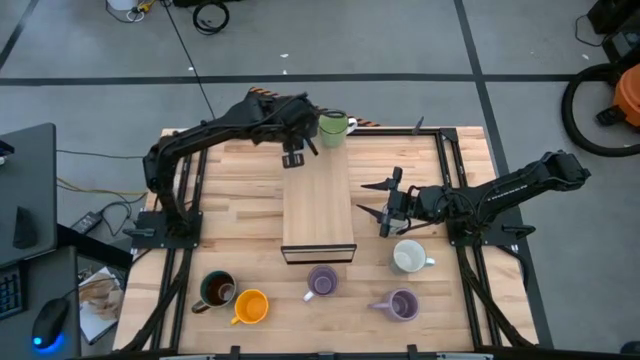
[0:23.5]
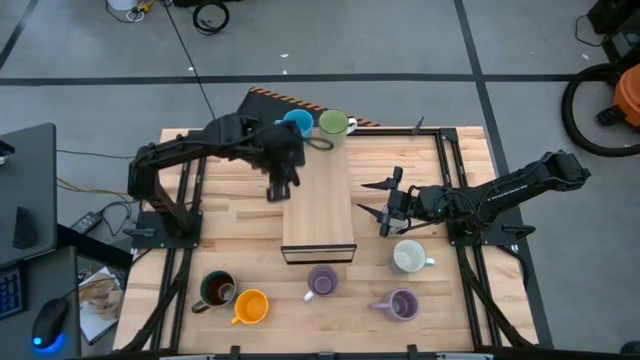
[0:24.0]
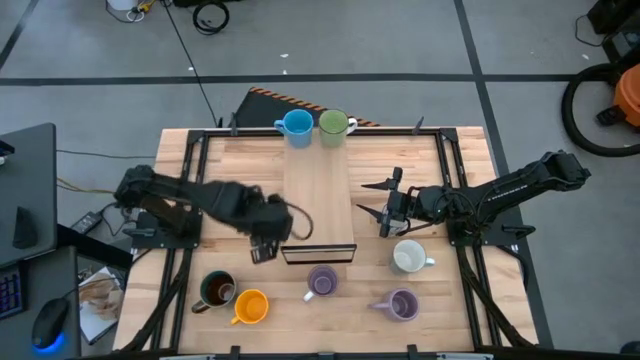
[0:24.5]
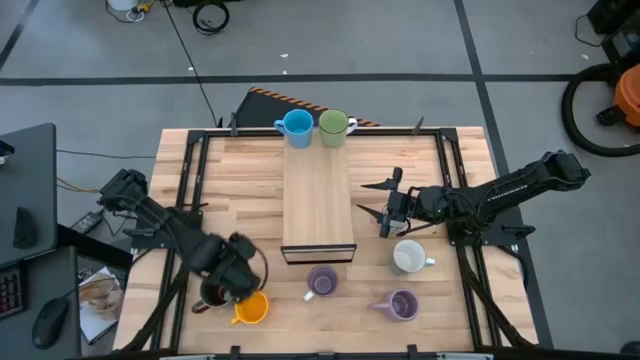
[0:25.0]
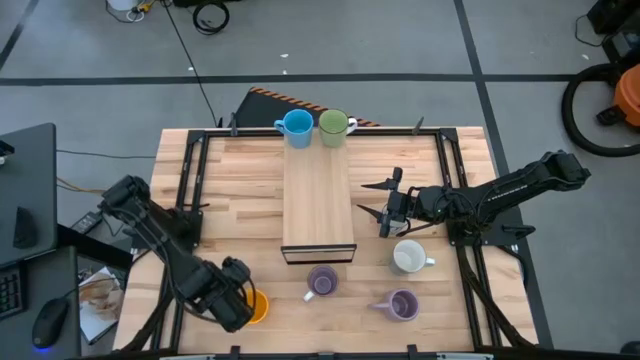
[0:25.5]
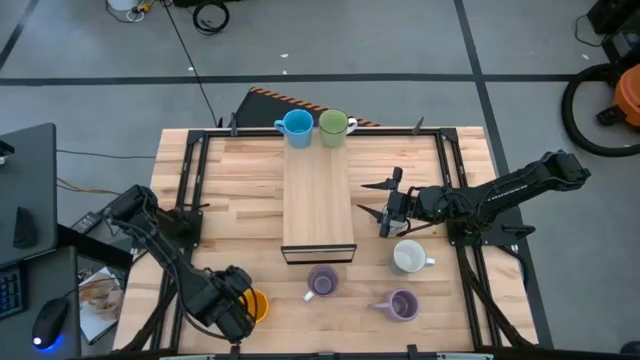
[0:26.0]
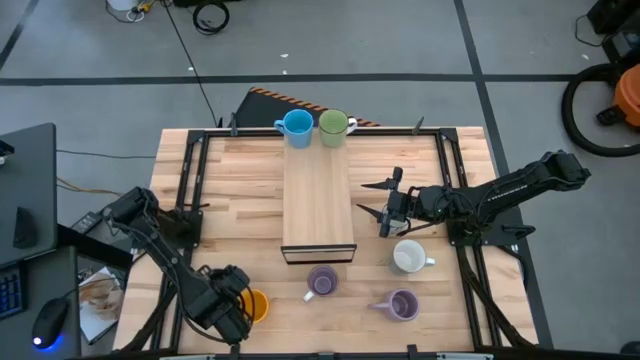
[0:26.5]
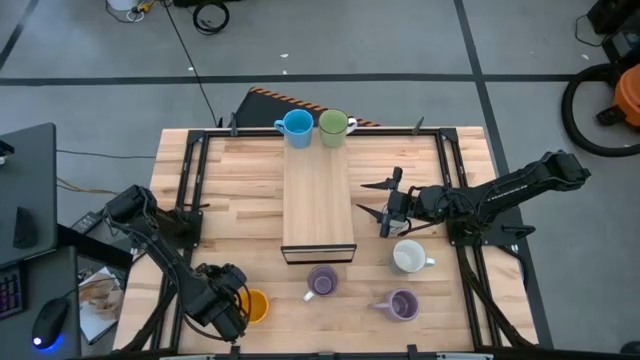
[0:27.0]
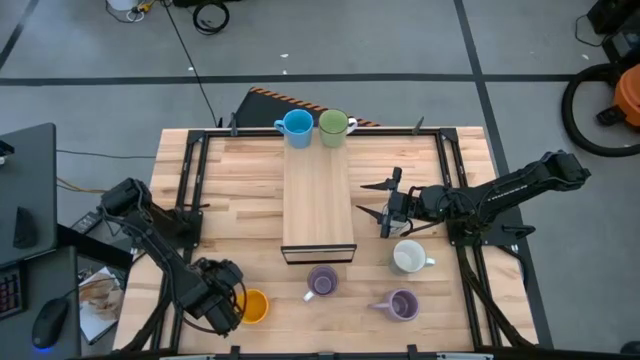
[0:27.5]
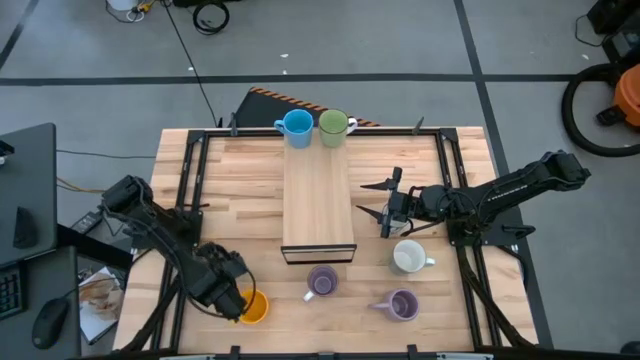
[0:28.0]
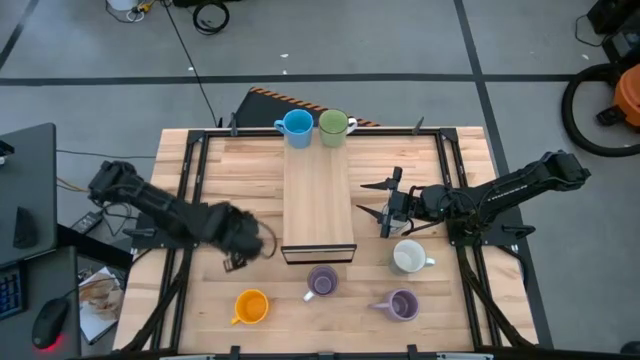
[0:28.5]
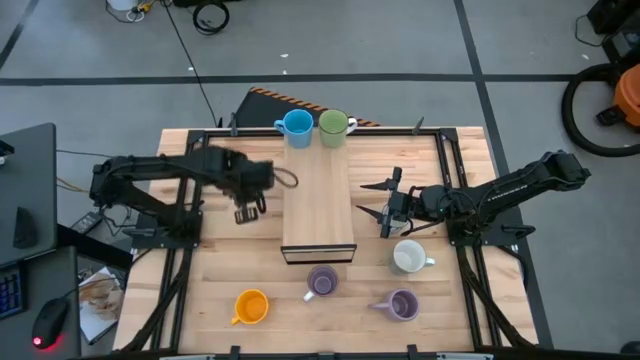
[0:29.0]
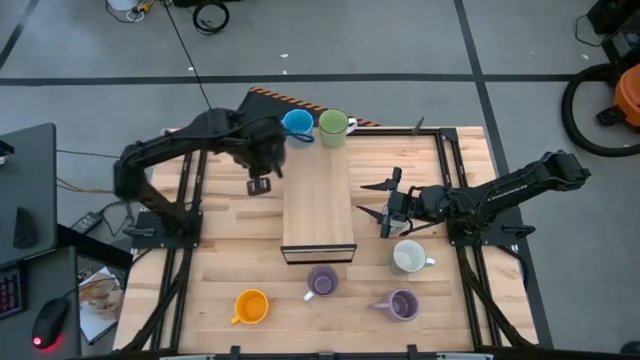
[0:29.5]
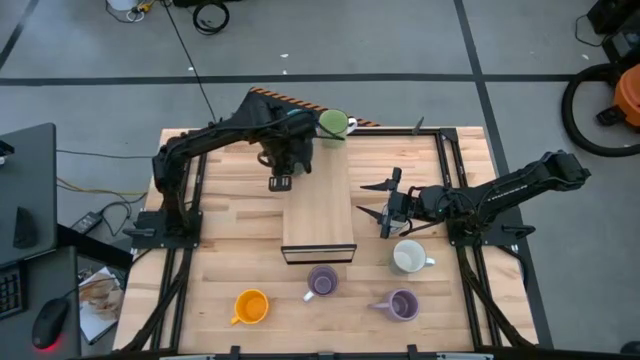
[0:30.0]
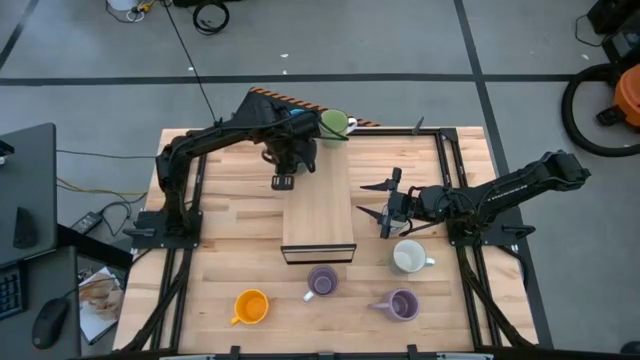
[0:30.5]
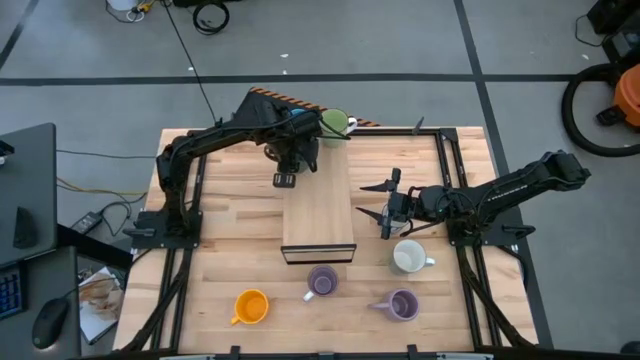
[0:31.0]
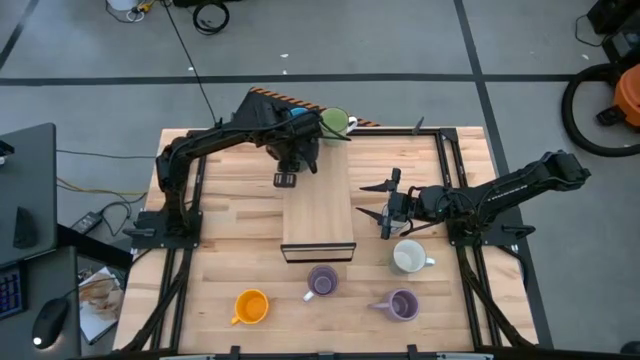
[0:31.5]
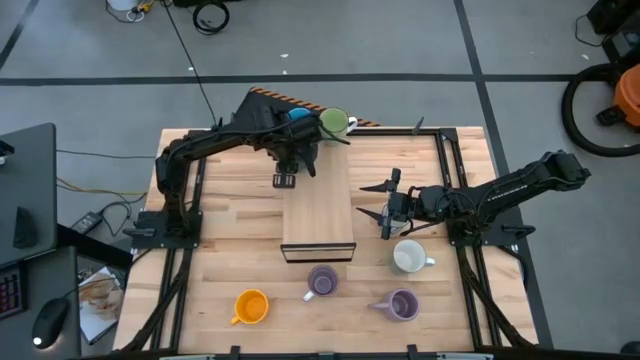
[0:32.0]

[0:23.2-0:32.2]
Task: Place coffee mugs
Put the dark blue mug on the shelf

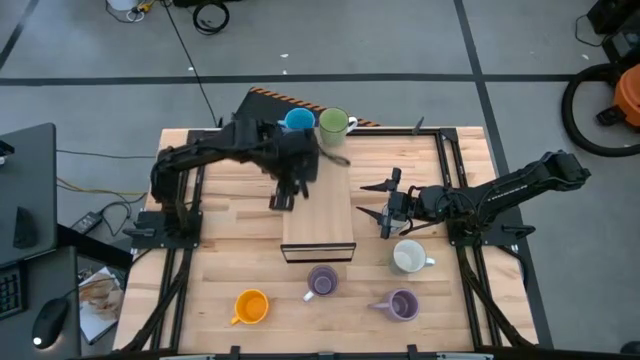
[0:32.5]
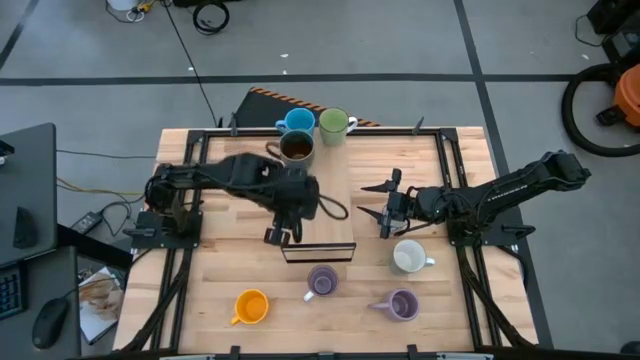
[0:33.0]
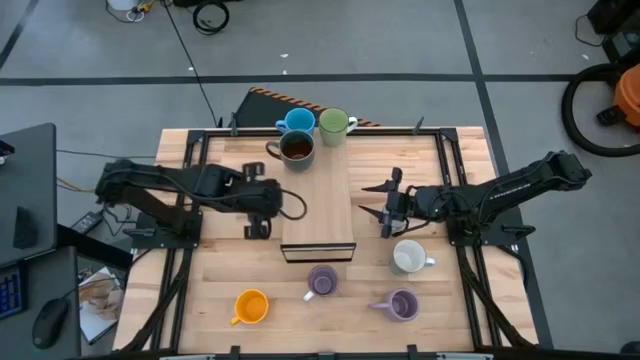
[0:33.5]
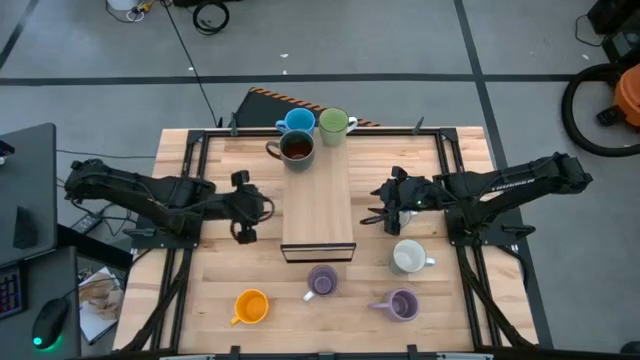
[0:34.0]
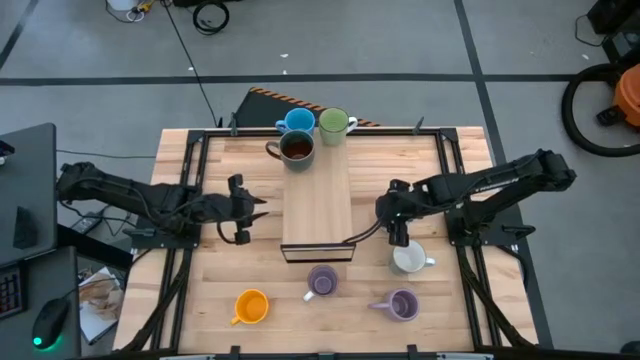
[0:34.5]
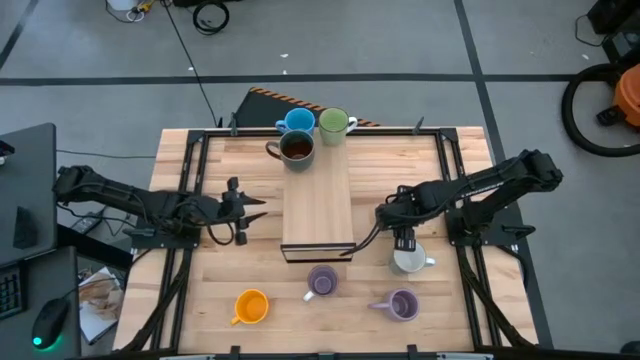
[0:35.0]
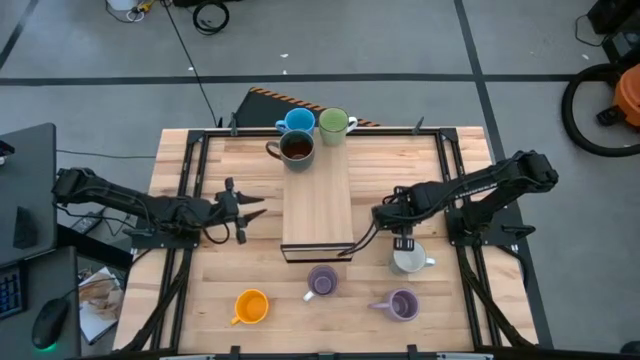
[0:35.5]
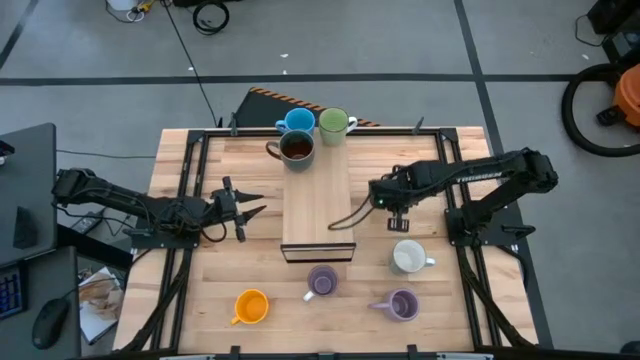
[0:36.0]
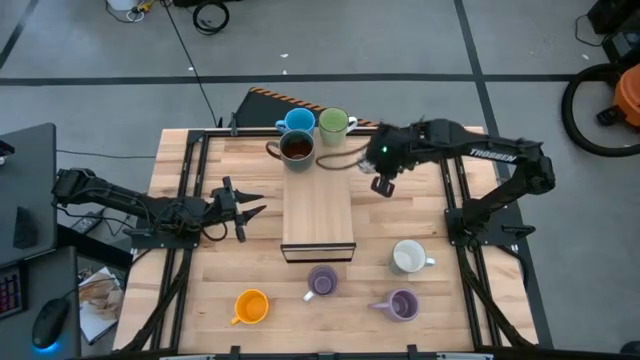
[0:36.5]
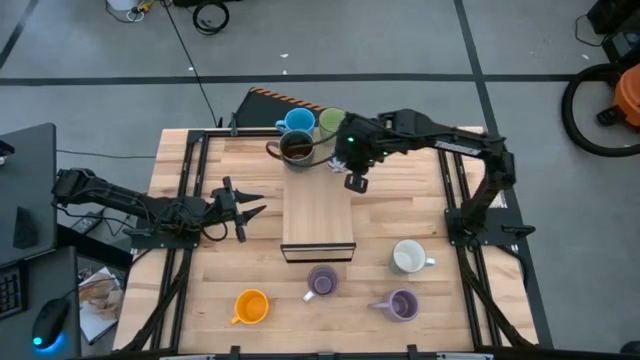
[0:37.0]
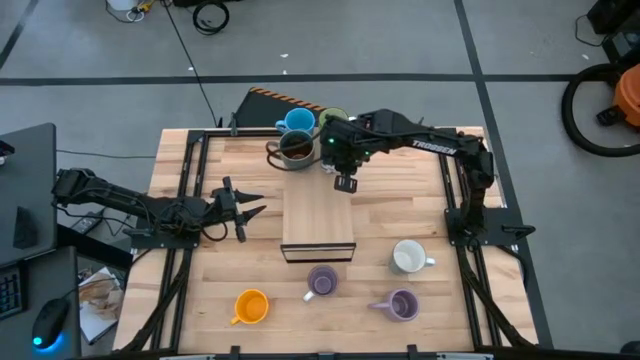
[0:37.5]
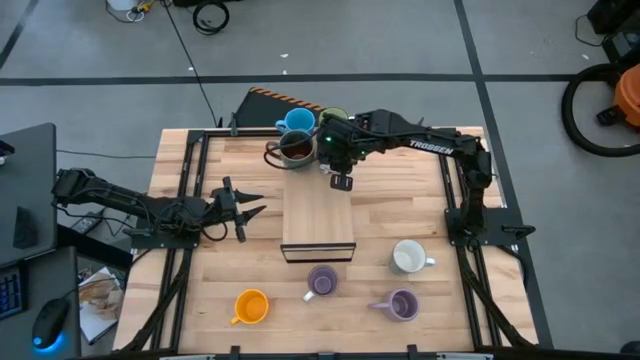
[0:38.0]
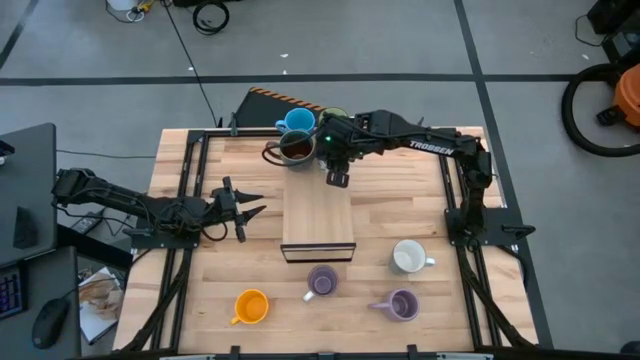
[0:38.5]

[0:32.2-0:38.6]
Put the white blue mug on the shelf

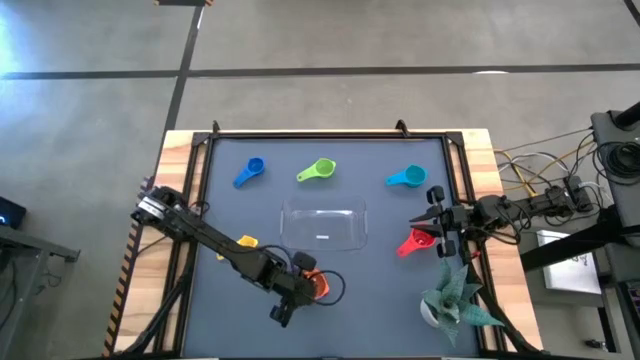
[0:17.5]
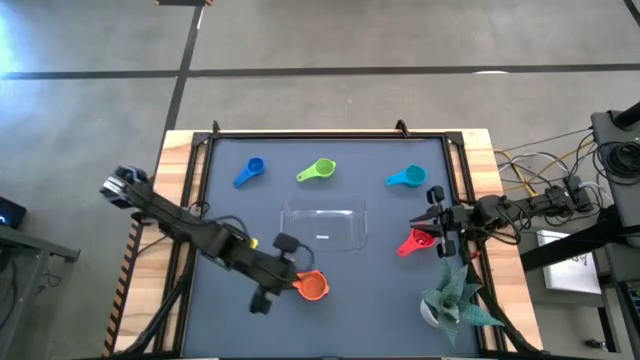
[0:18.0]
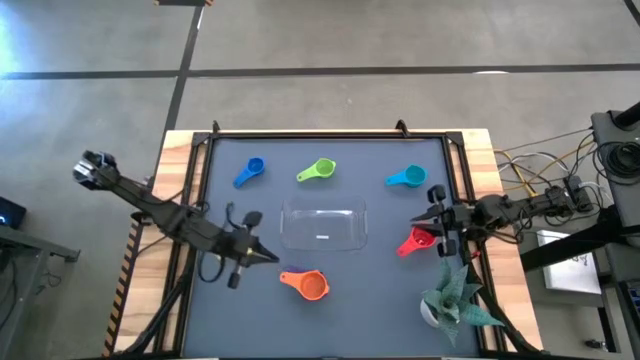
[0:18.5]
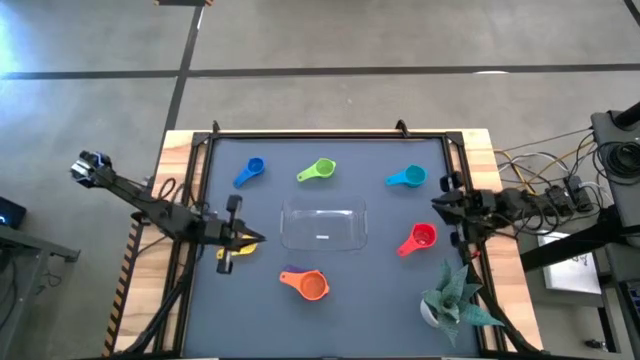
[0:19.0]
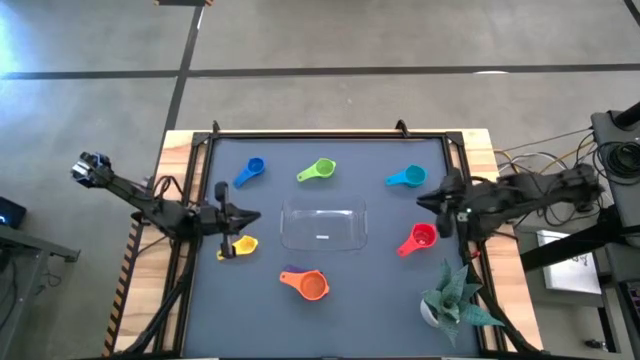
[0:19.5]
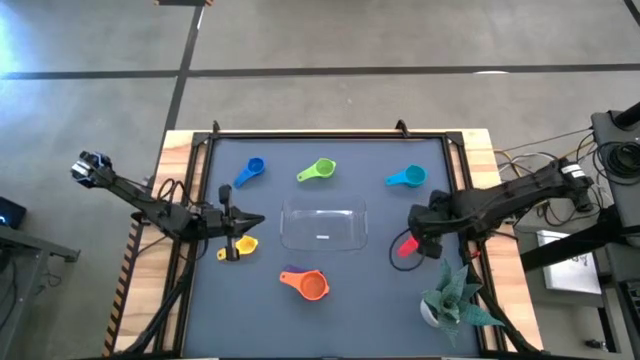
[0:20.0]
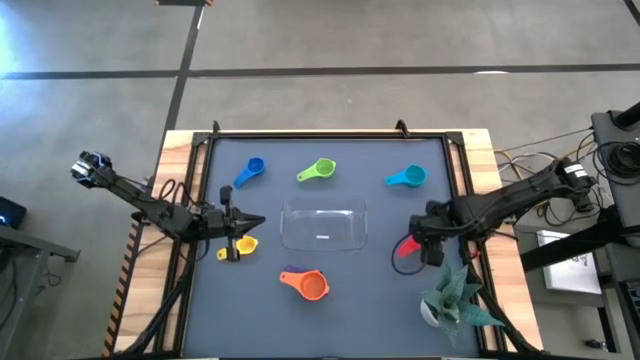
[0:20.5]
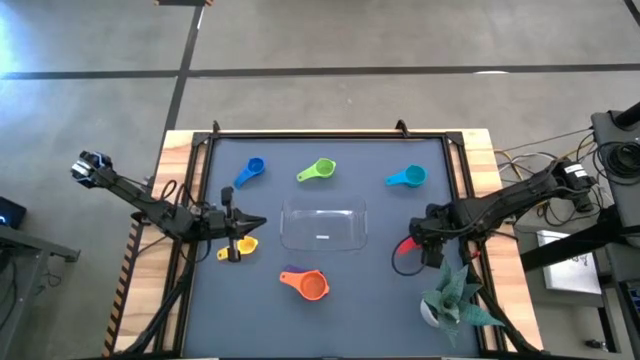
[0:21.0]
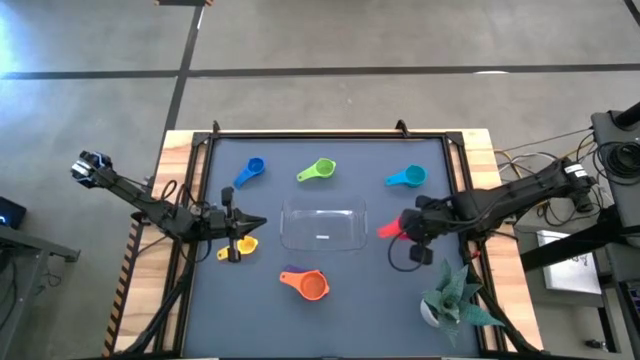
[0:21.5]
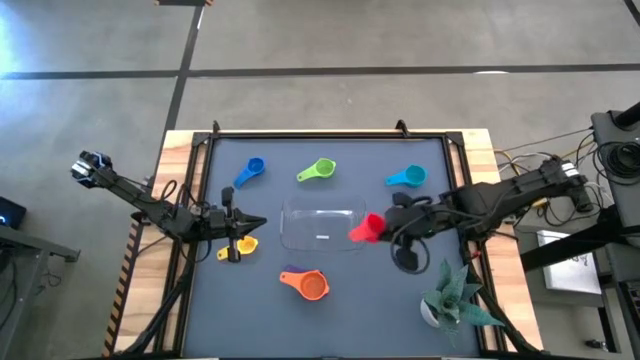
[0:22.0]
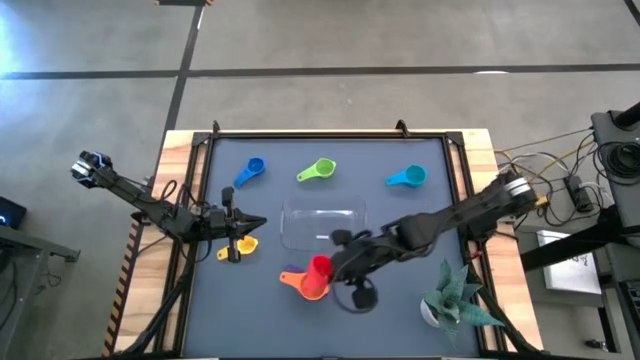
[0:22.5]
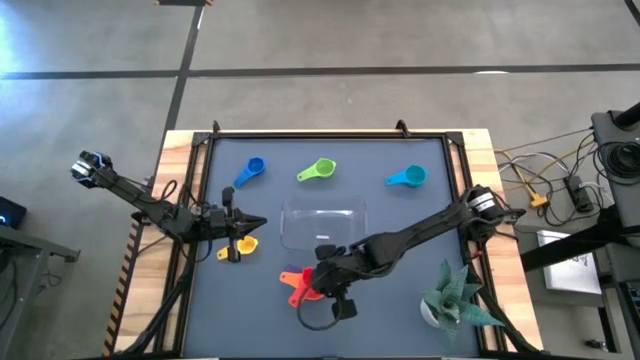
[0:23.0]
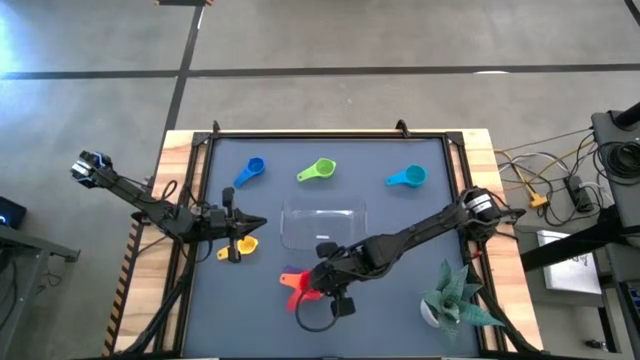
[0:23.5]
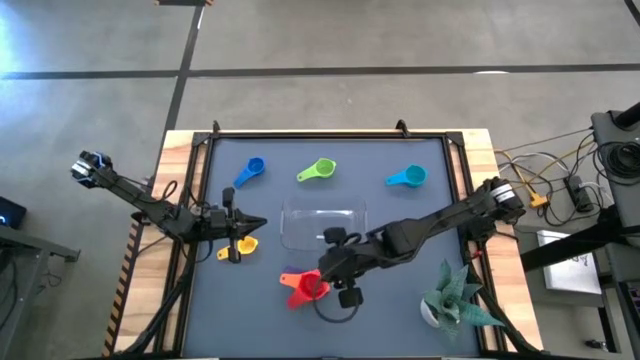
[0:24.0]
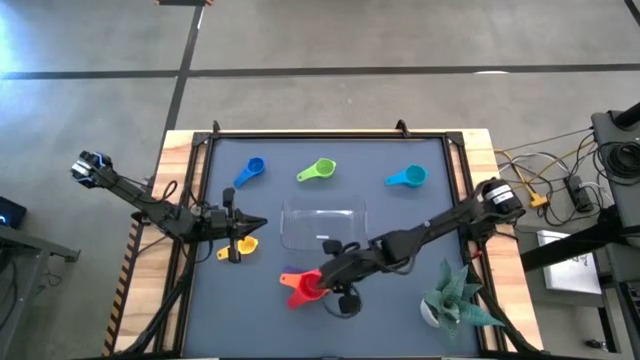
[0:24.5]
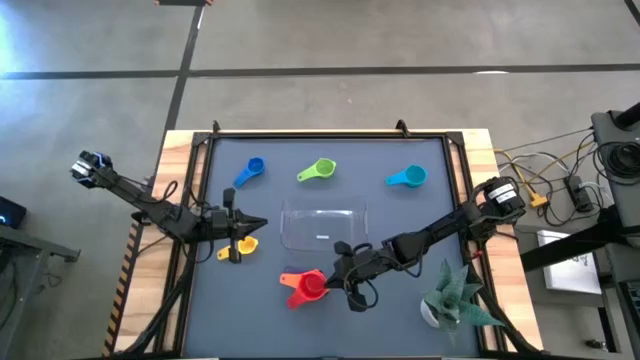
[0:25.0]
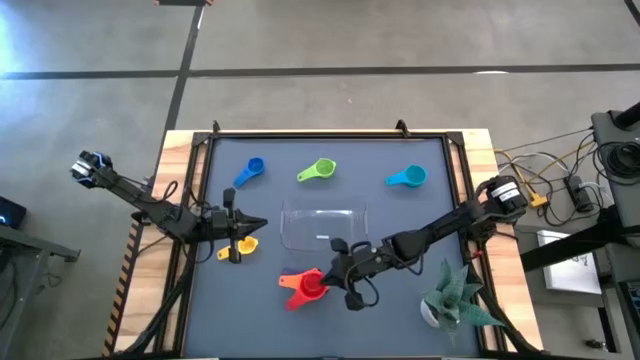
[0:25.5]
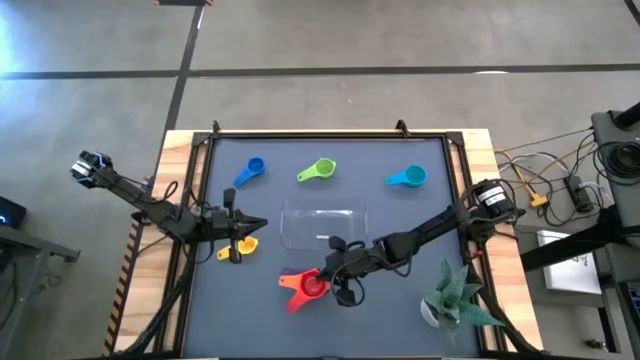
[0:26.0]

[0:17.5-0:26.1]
Task: Nest measuring cups in basket
Stack the red measuring cup on top of the orange measuring cup
